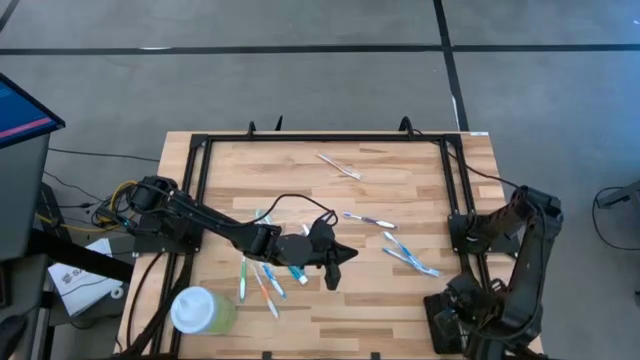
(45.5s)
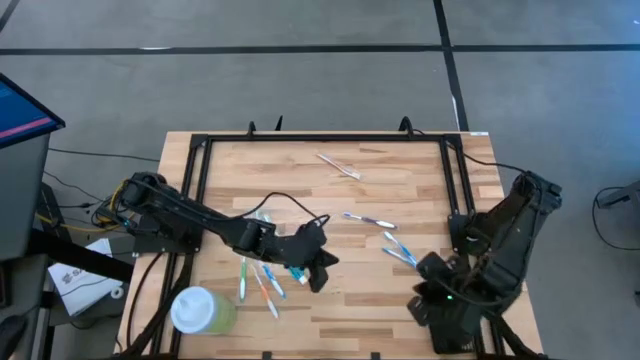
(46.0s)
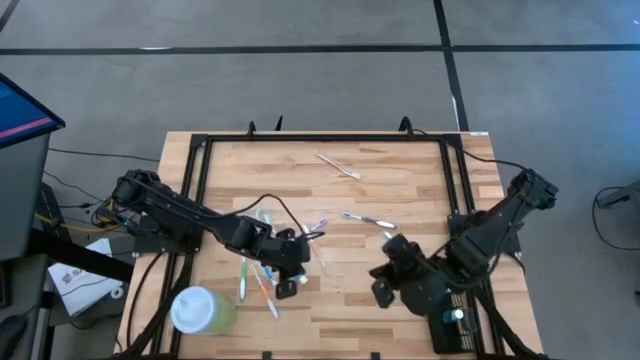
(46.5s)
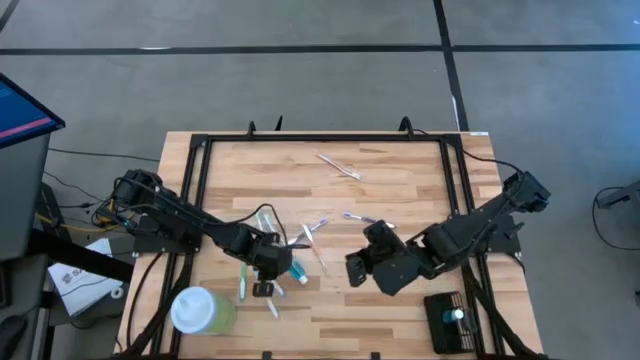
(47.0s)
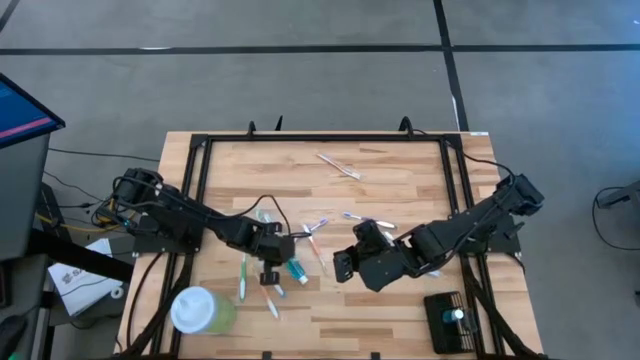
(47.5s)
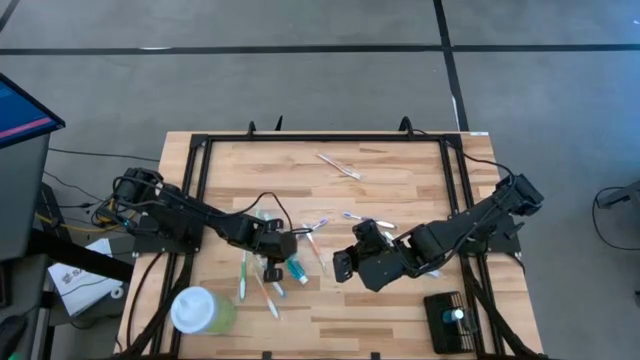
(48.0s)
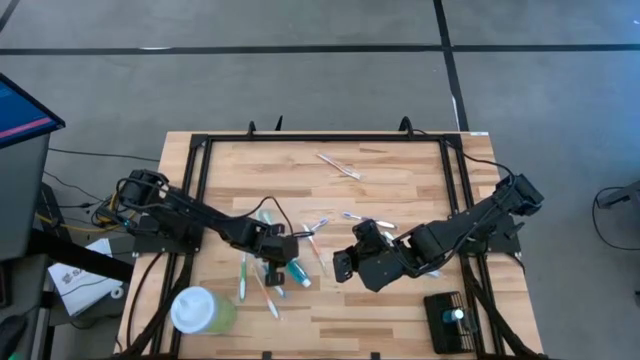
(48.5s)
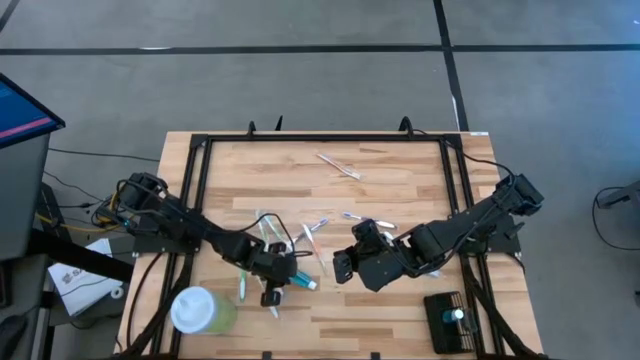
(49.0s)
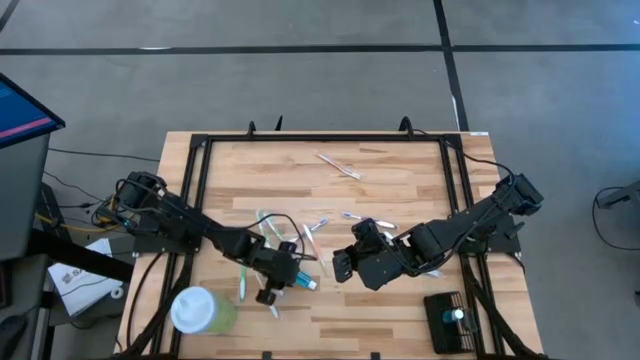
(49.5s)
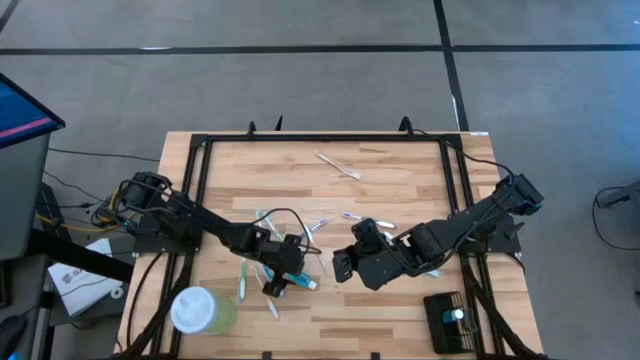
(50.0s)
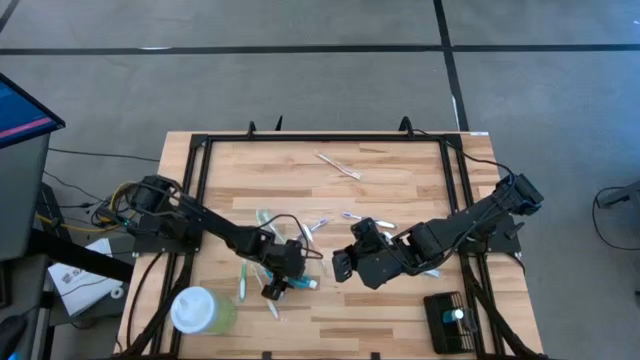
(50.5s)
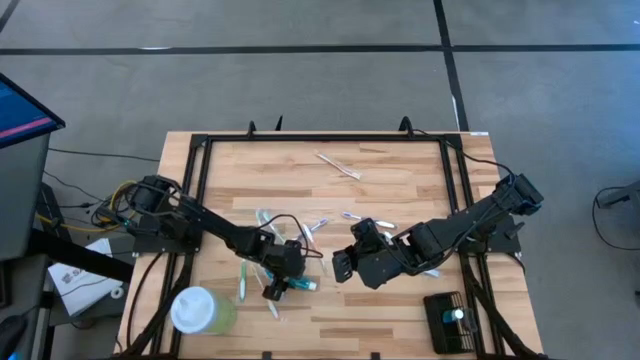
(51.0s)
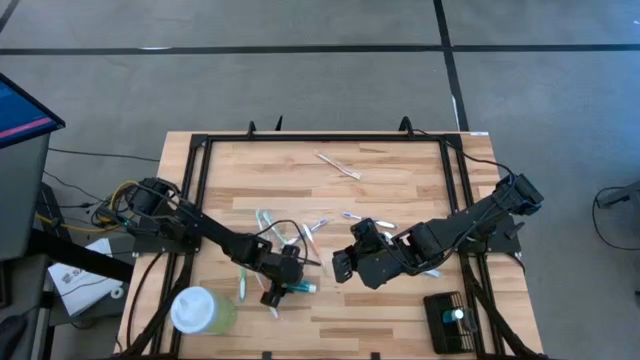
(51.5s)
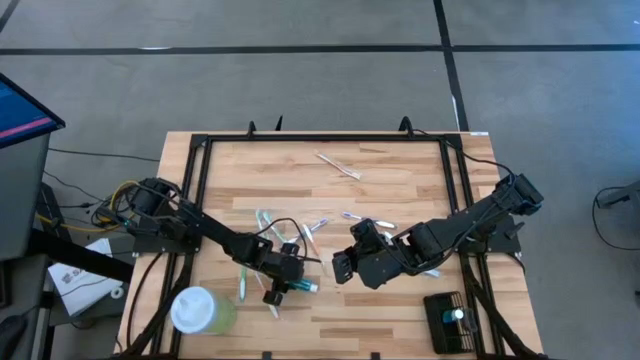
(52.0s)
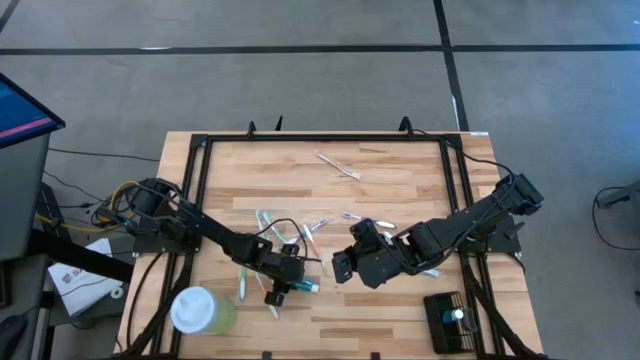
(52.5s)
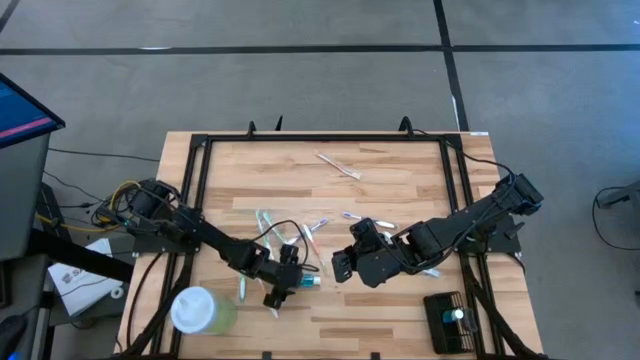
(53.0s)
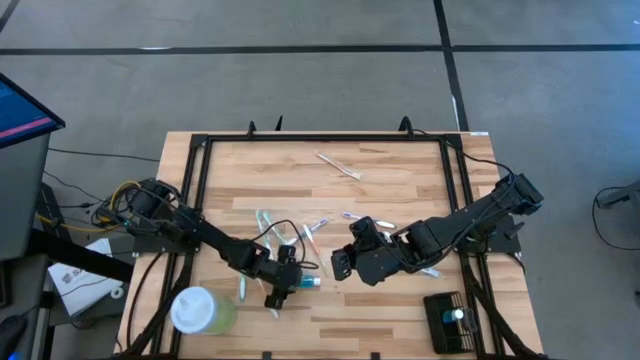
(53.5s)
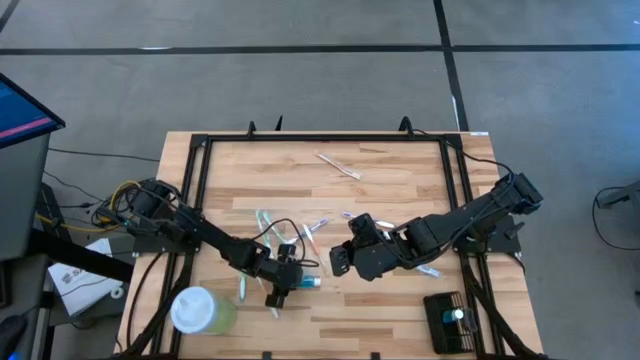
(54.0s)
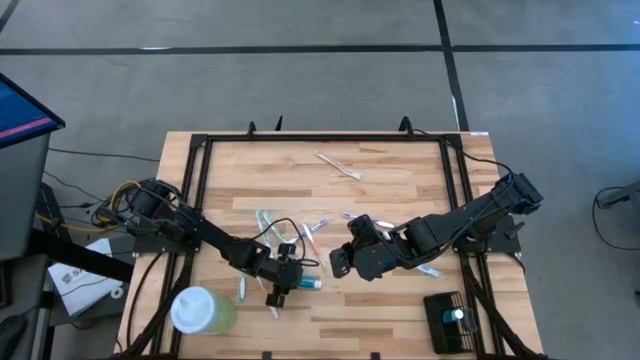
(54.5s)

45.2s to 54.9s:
Task: Pick & Place toothbrushing station
Put the blue mouthwash bottle into the black organizer

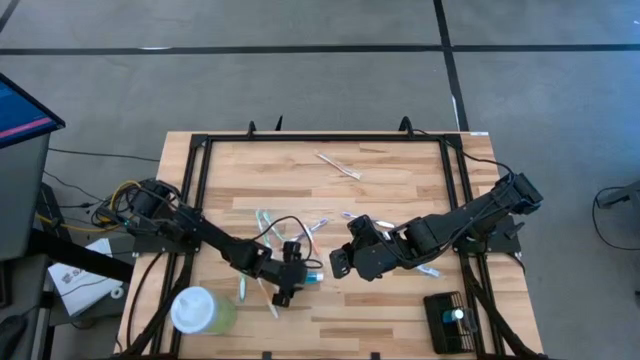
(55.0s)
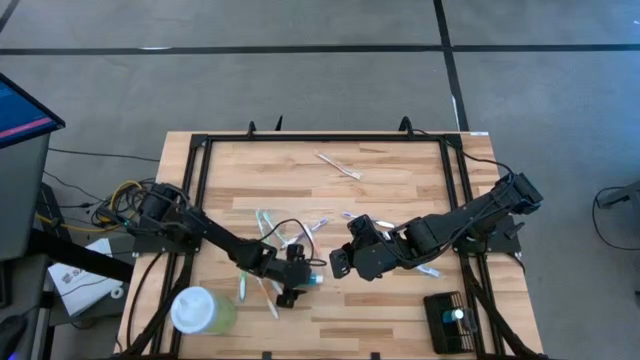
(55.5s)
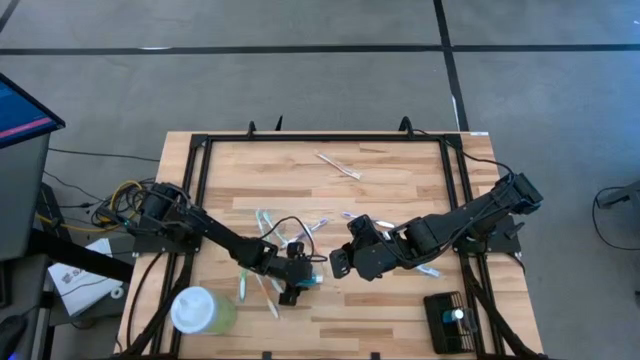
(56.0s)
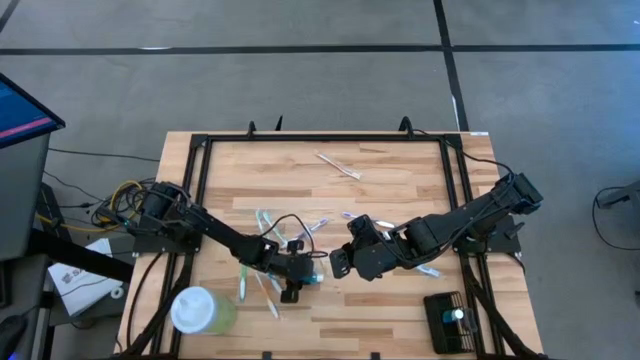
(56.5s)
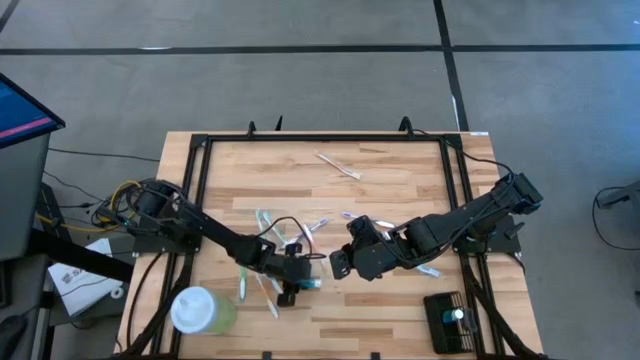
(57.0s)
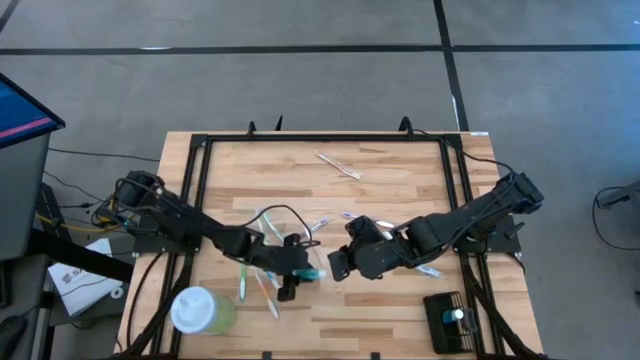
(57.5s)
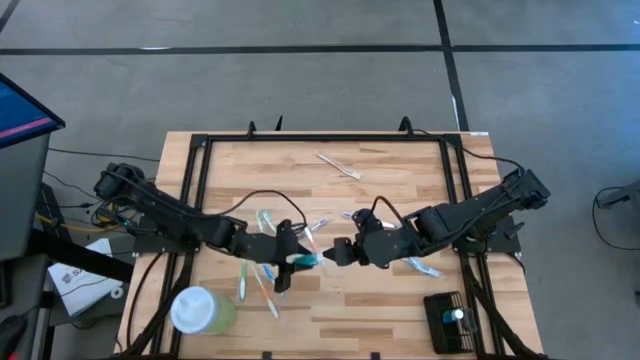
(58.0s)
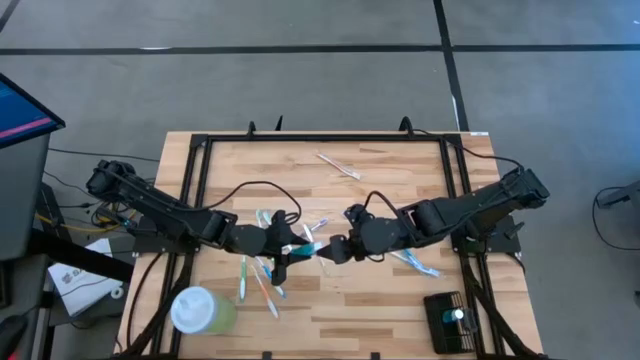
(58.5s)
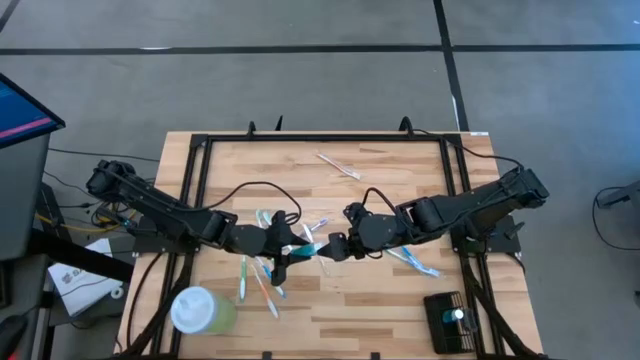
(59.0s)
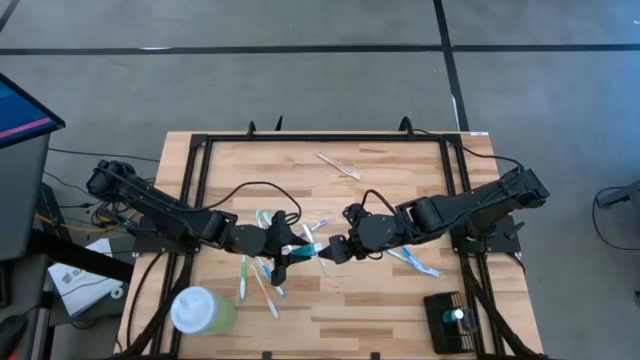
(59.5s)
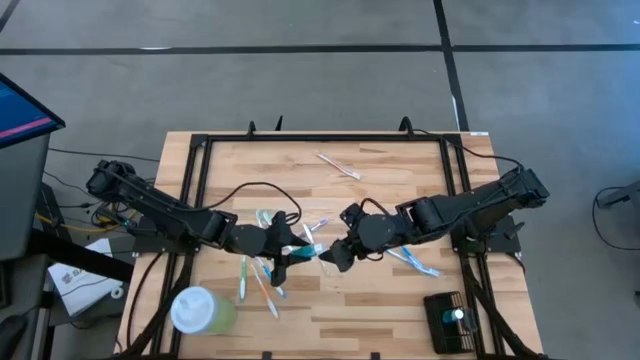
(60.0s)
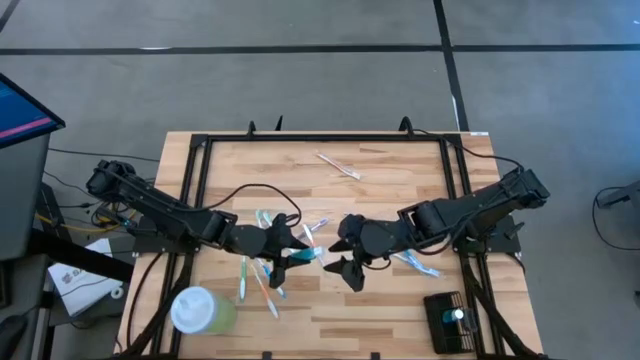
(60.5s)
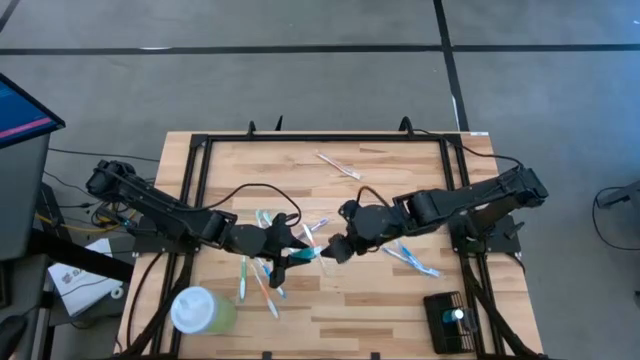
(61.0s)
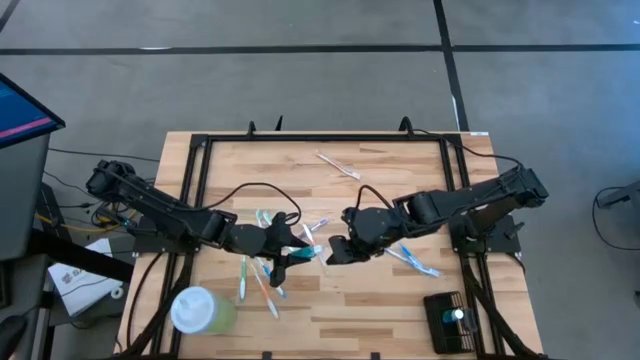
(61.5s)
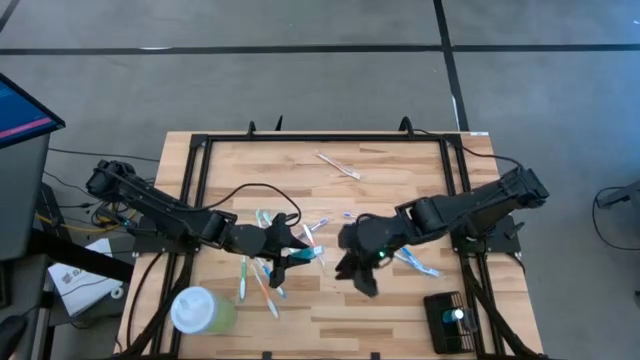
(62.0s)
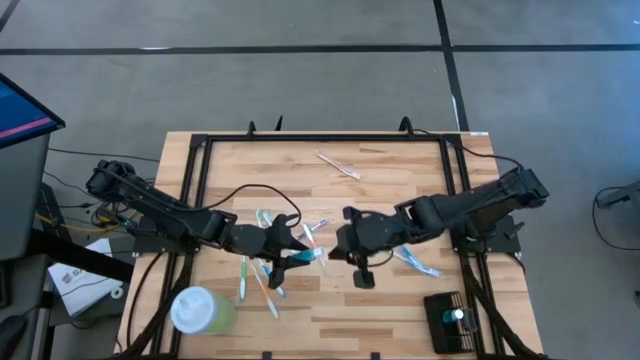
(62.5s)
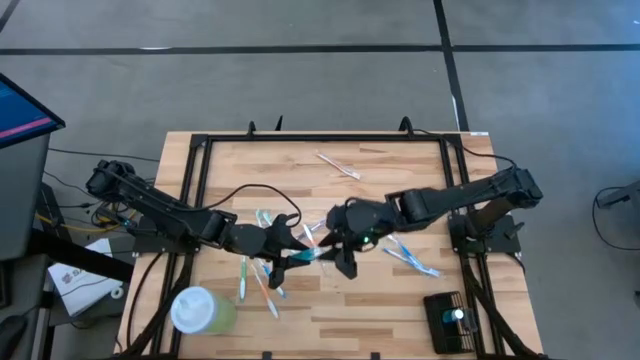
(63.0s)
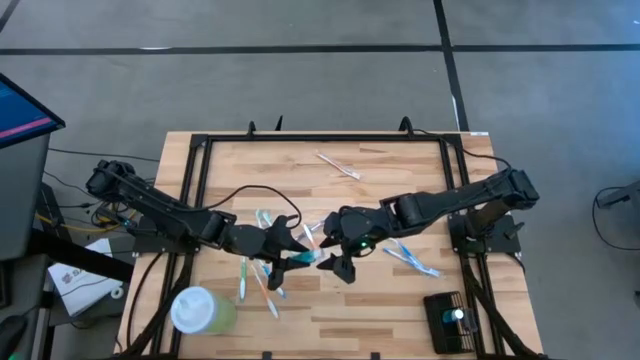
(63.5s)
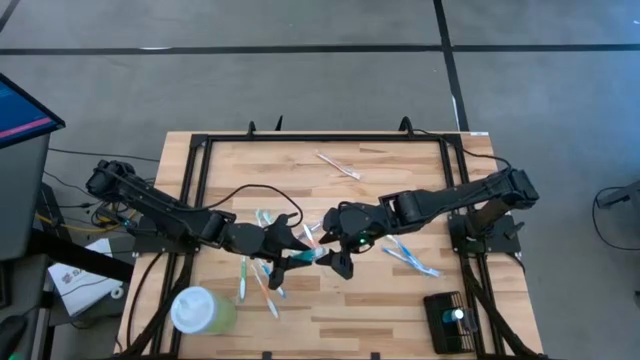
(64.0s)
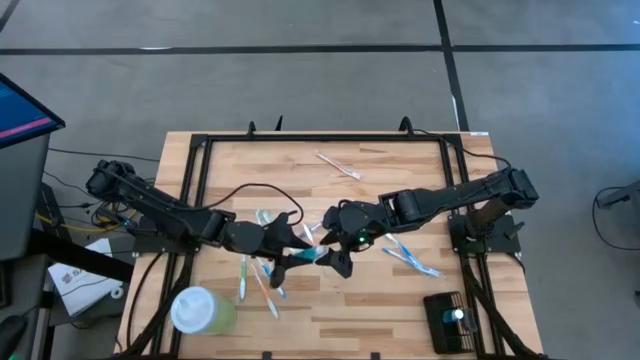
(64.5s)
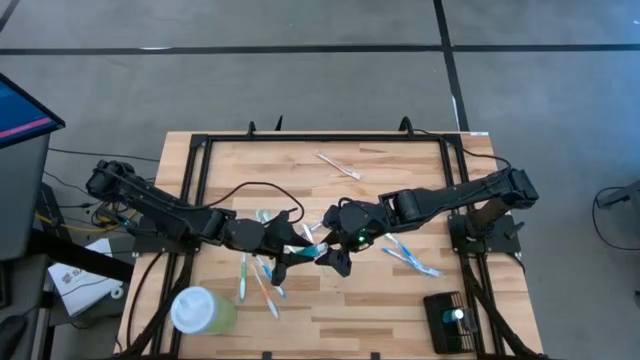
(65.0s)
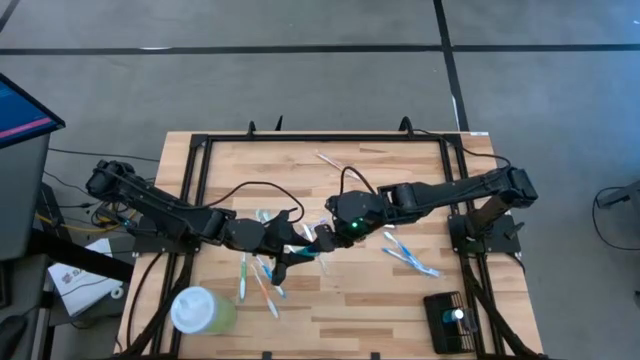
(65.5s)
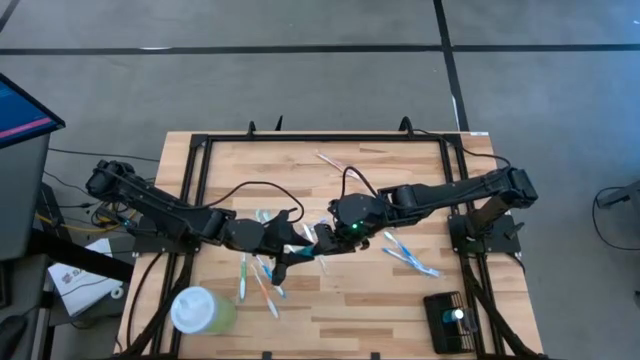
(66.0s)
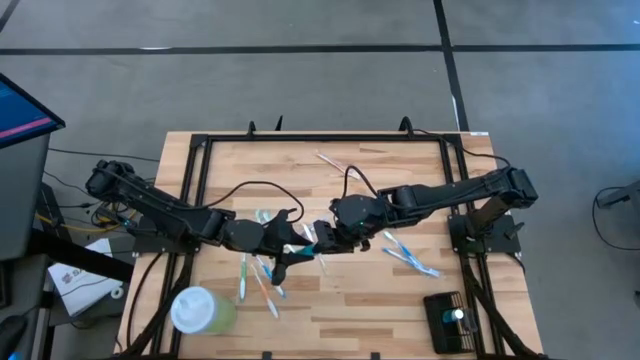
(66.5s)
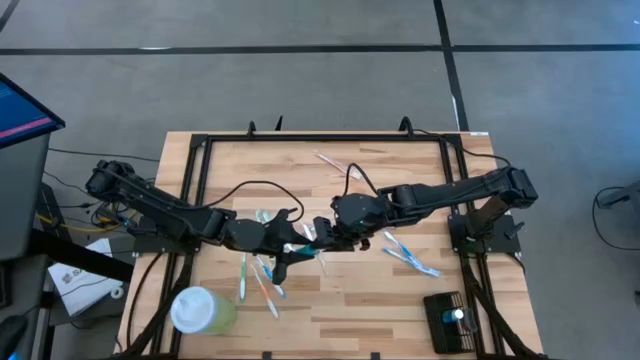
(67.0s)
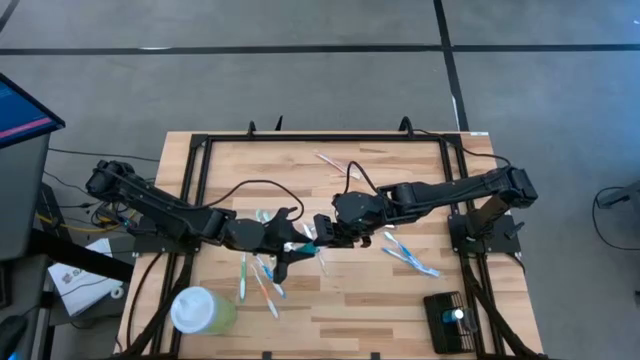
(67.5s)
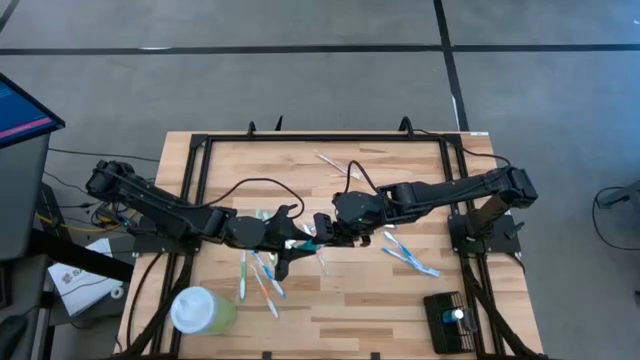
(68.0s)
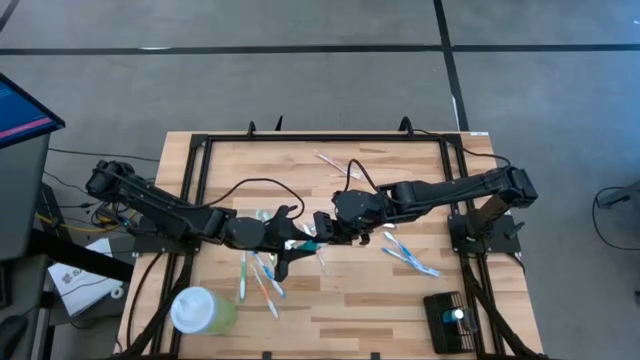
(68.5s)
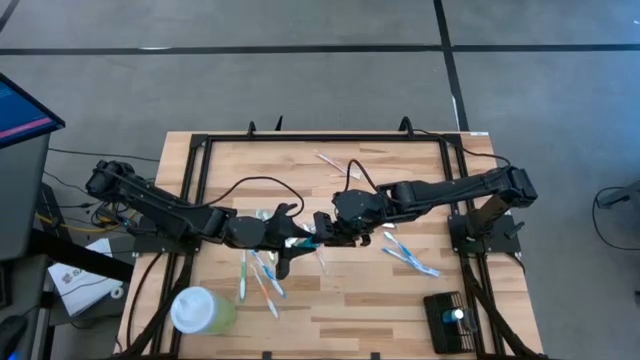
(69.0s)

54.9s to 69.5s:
Put the blue mouthwash bottle into the black organizer
